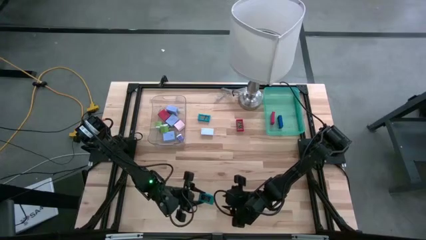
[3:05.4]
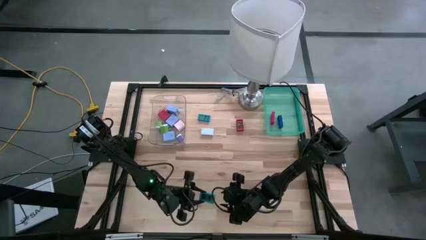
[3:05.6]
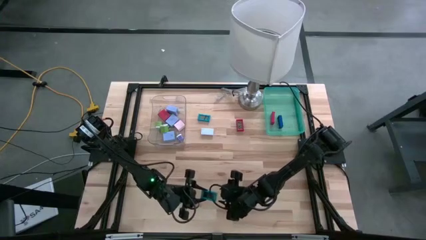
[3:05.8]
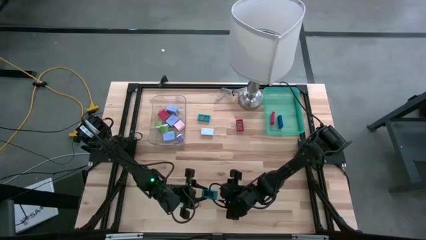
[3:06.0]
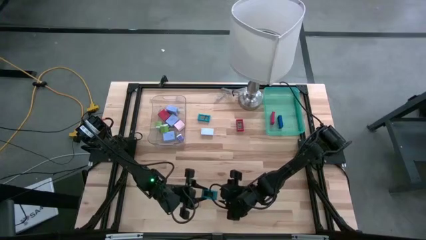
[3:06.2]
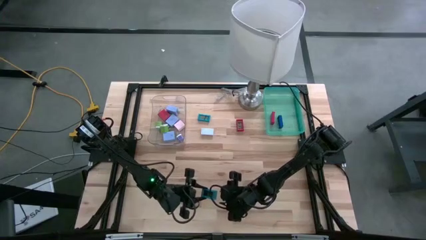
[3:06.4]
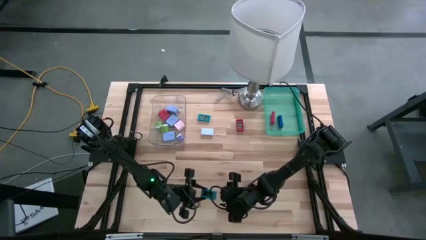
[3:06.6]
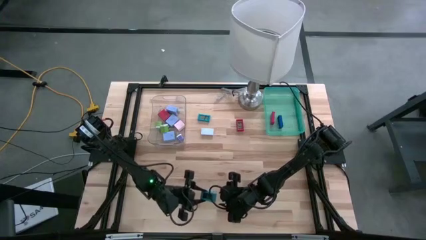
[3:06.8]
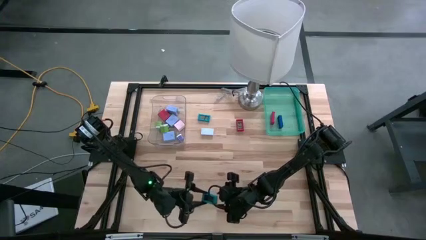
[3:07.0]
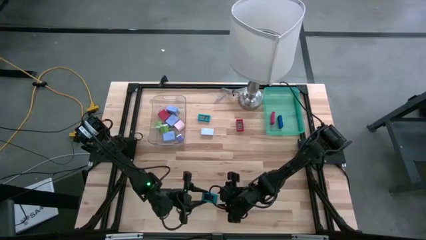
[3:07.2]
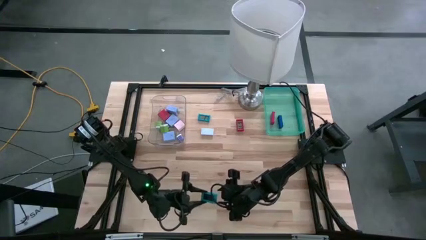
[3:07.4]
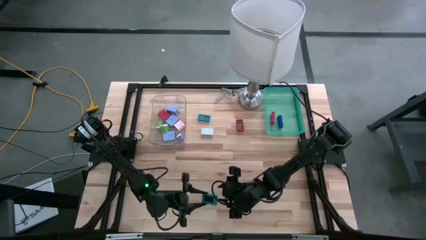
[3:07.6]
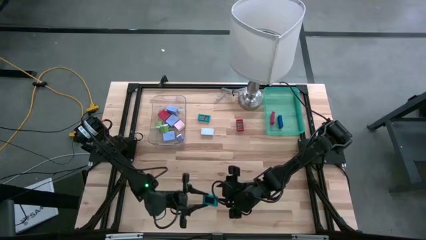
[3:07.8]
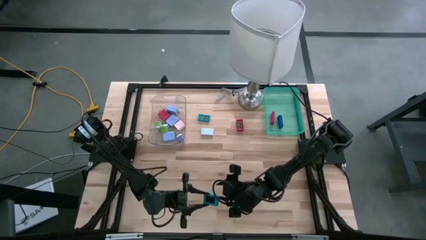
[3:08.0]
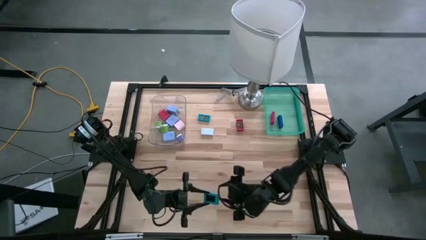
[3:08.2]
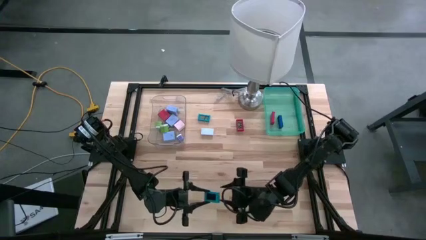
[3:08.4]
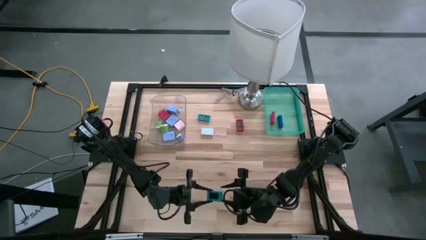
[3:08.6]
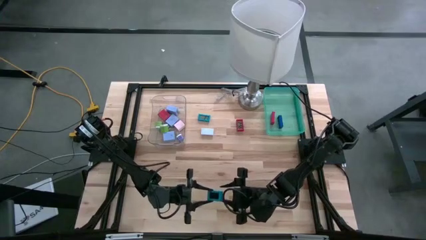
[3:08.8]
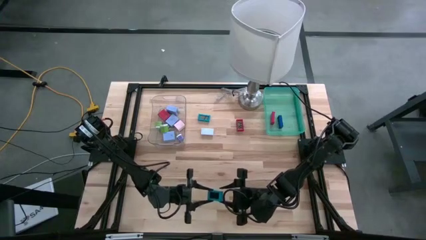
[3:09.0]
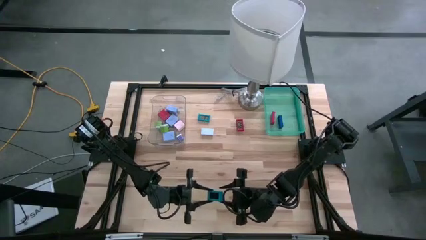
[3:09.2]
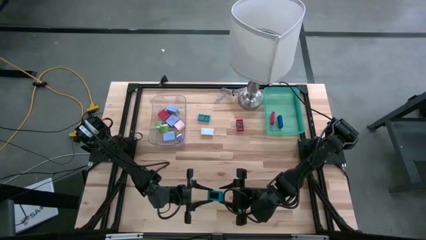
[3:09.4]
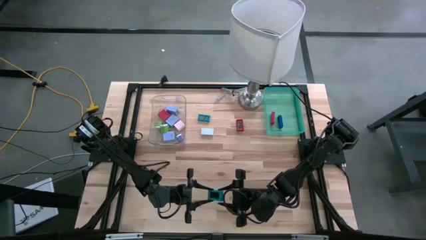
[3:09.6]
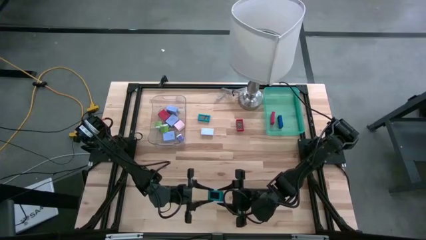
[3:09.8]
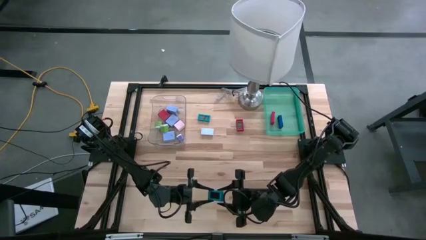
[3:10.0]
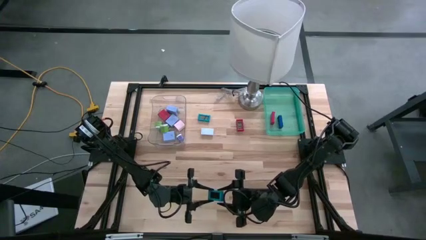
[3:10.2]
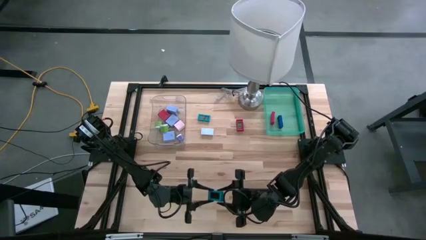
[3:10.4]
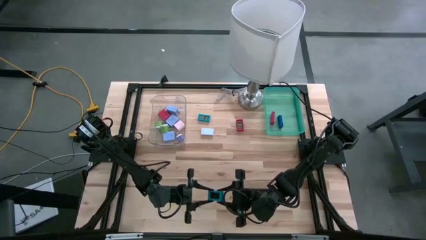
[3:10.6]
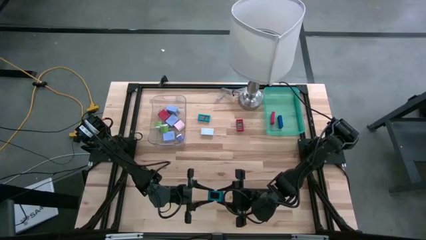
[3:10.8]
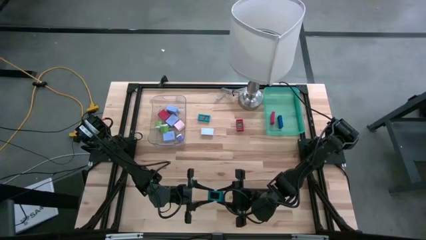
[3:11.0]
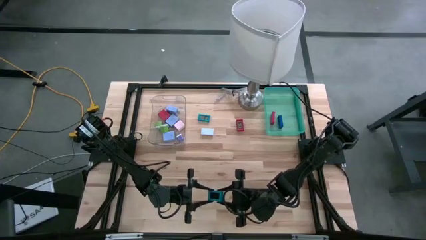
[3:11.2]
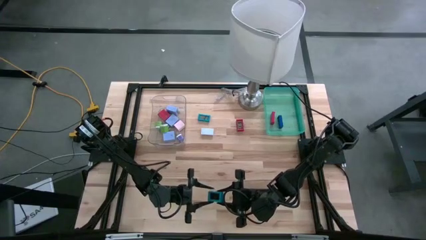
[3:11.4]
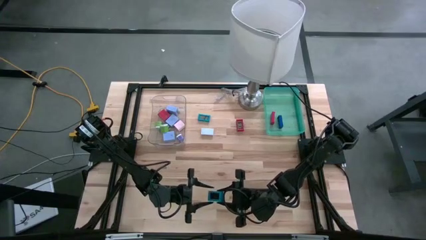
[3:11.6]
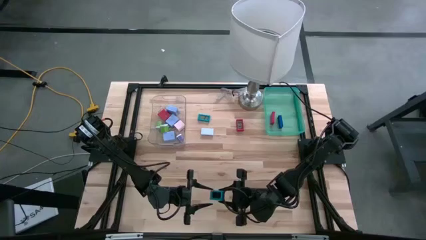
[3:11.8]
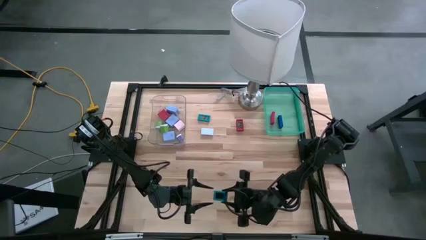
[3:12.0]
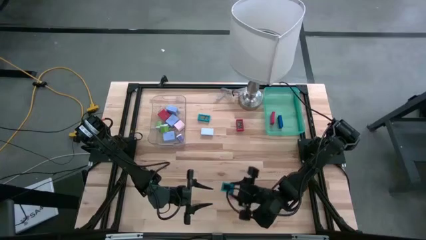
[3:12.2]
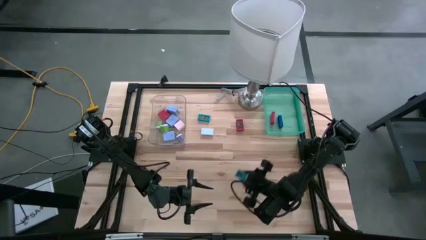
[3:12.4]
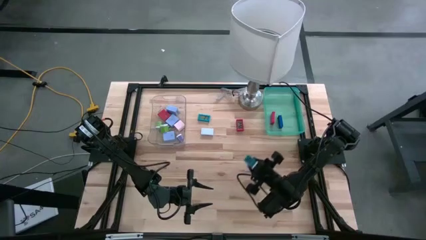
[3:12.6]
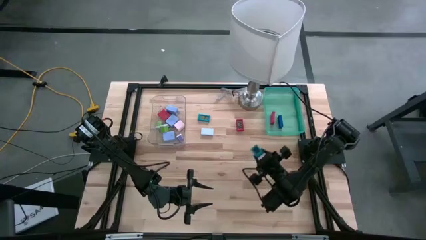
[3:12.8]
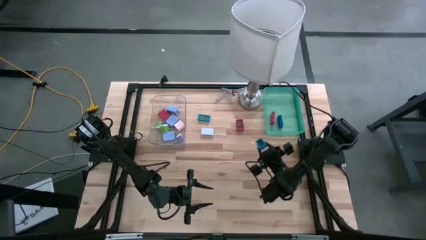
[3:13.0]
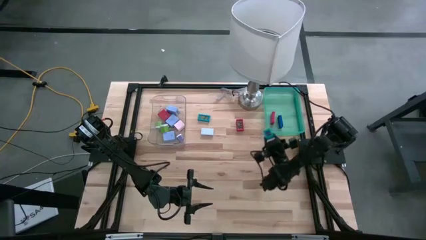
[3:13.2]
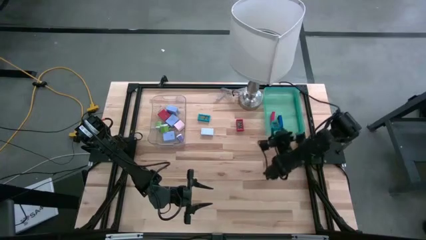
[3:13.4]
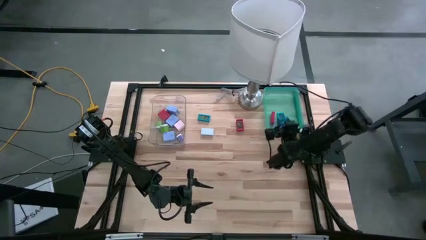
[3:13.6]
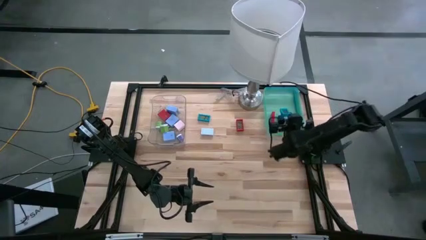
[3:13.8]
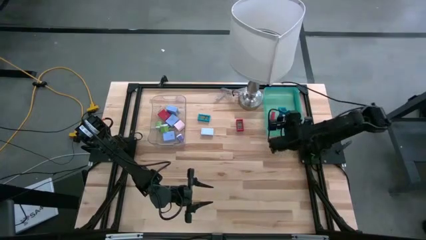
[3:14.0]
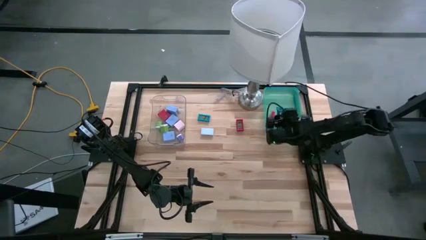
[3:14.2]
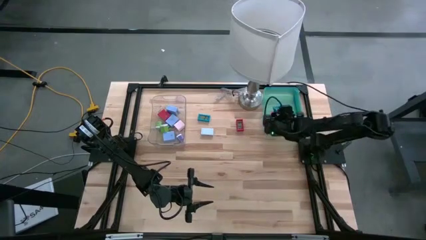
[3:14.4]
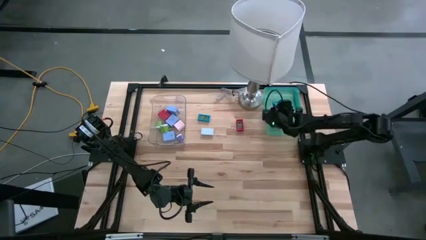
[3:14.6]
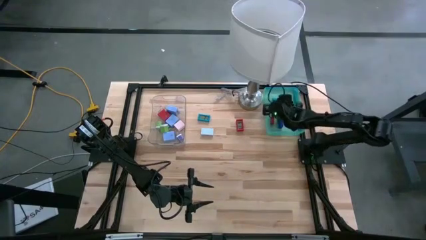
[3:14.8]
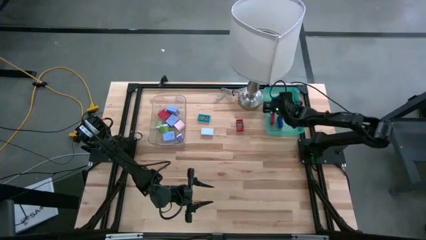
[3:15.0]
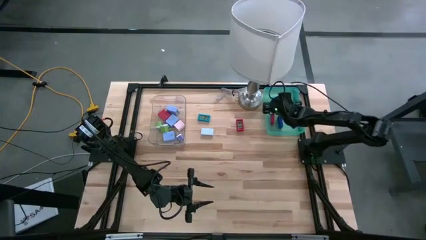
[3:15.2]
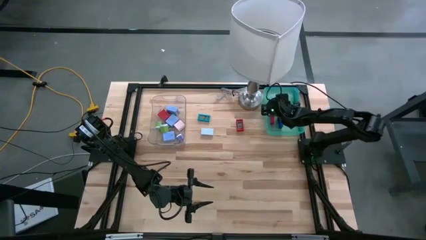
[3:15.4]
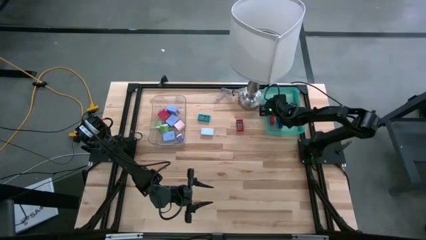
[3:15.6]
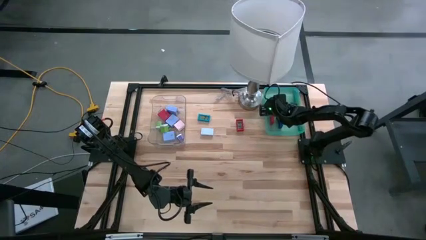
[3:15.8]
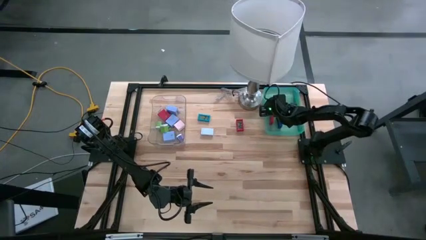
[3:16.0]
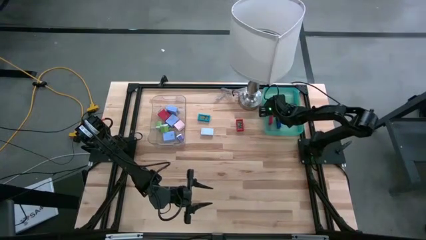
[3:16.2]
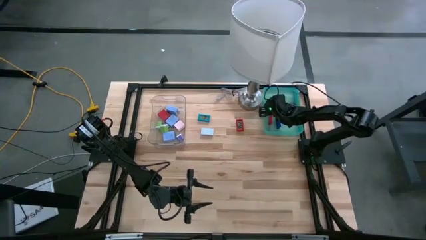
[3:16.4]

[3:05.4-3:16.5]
Task: Pick & Place Office items
Put the bottom light blue mini digital clock into the light blue bin

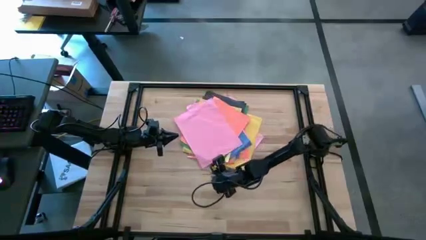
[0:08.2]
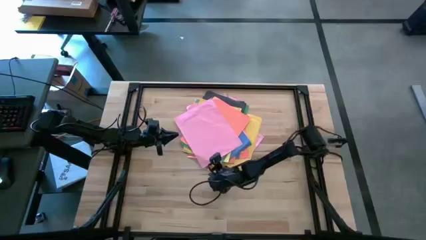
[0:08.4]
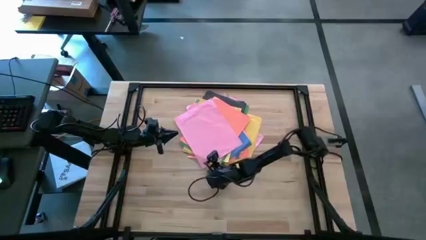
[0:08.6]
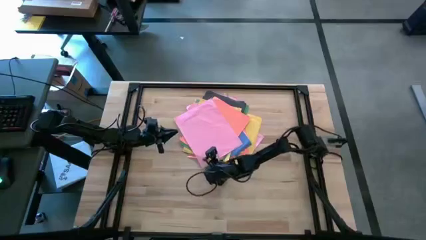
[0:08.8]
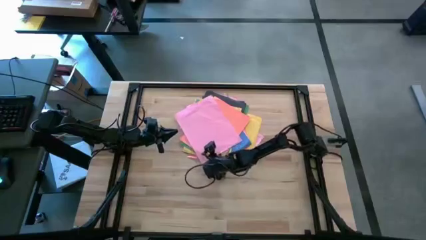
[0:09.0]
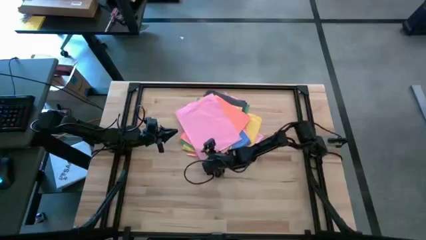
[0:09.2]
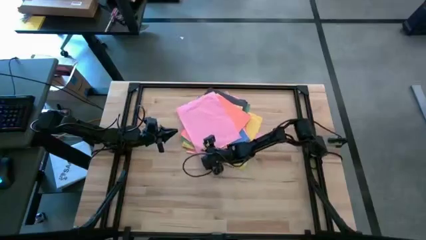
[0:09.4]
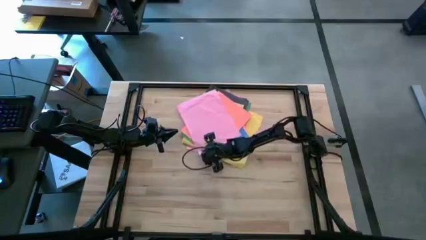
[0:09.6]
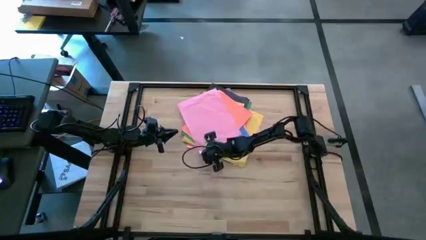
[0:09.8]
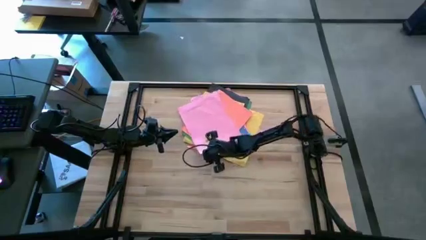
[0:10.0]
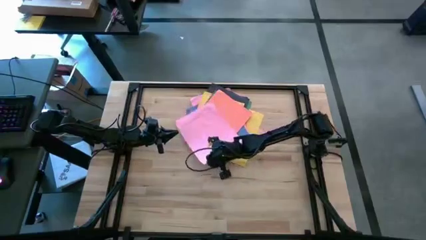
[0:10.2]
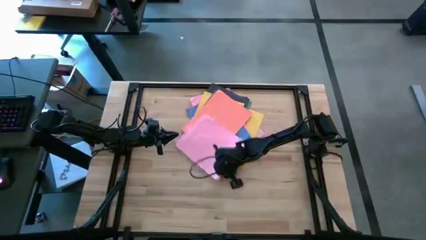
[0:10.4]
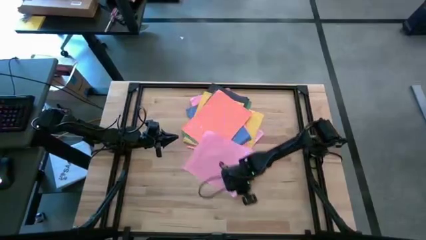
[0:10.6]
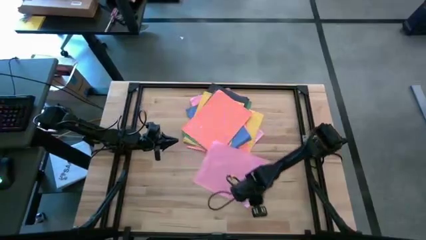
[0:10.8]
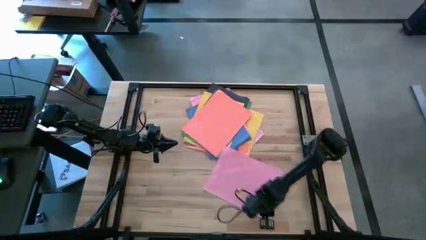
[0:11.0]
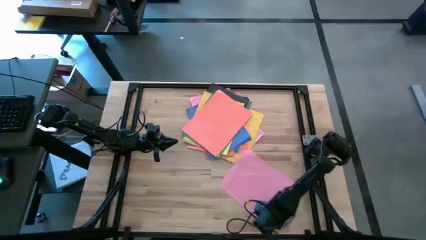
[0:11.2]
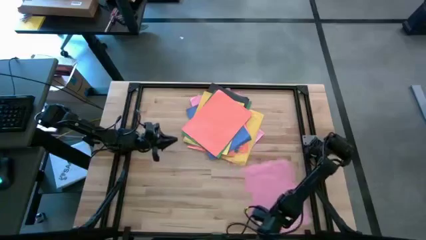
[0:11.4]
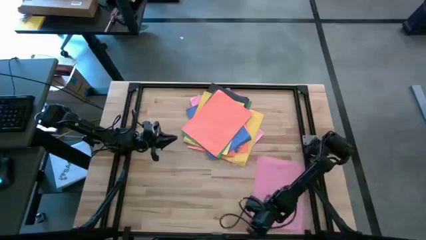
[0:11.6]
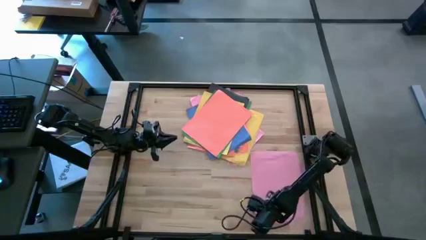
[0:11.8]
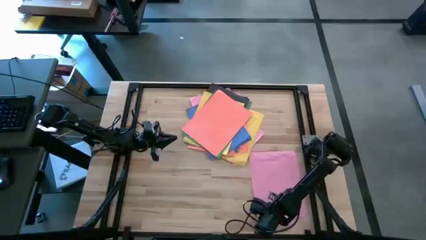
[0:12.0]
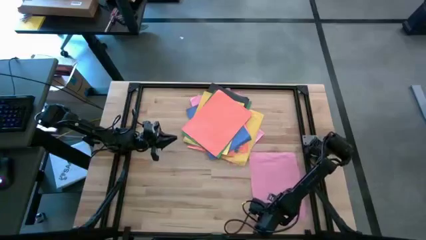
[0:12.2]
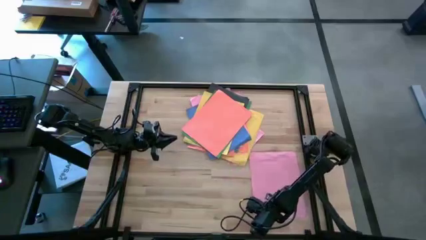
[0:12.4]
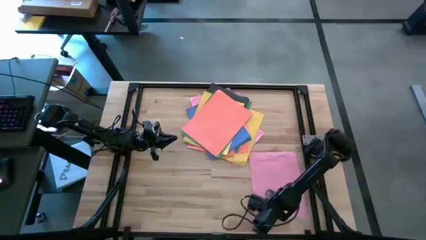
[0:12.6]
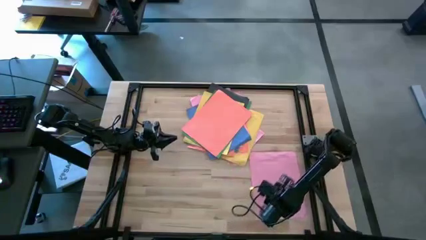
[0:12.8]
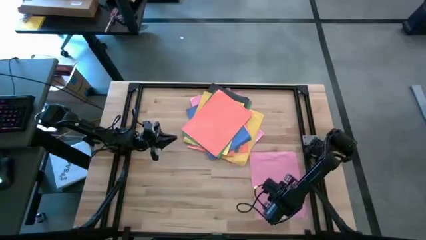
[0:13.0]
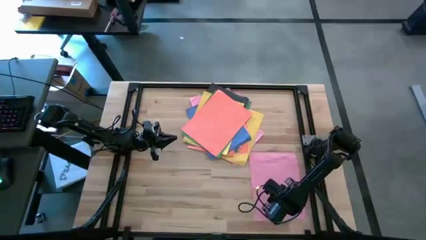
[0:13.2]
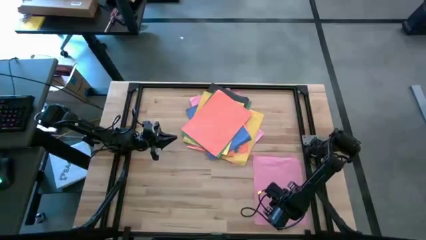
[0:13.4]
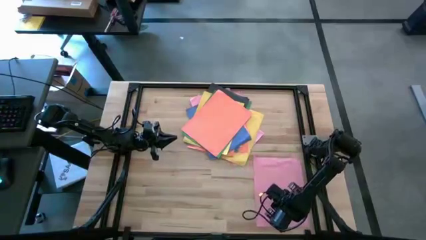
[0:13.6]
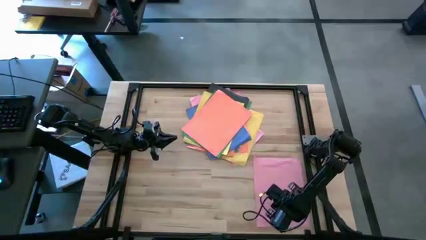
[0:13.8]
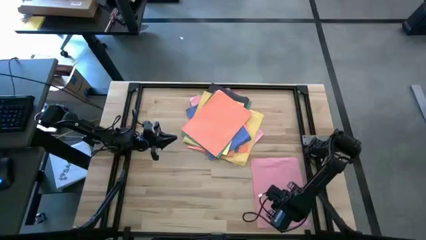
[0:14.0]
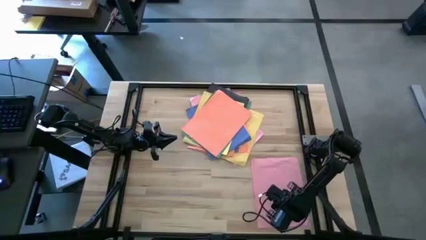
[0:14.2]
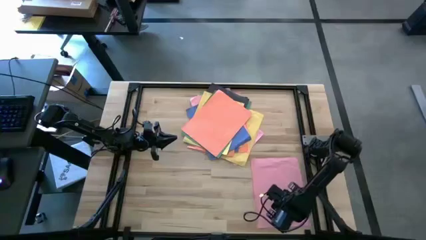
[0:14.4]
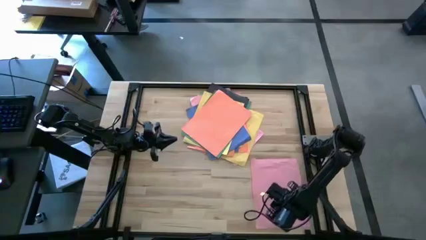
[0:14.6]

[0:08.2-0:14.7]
Task: Organize paper
Move the pink paper to the lower right of the table
